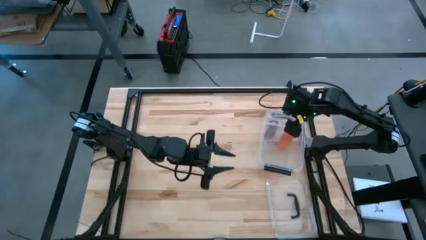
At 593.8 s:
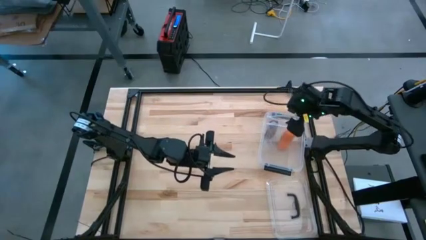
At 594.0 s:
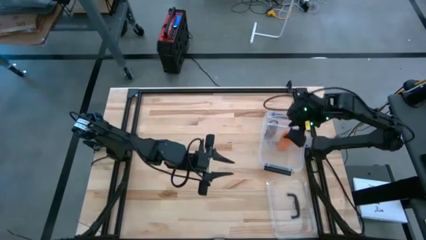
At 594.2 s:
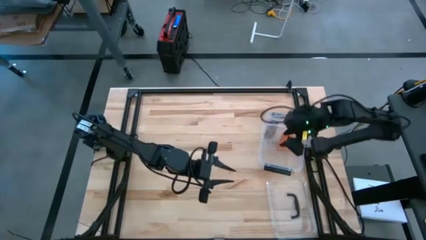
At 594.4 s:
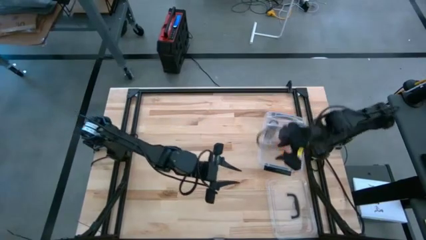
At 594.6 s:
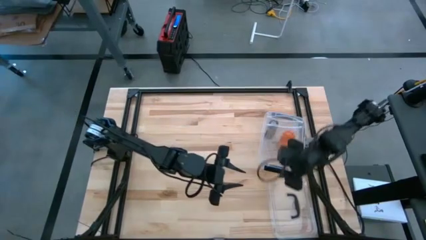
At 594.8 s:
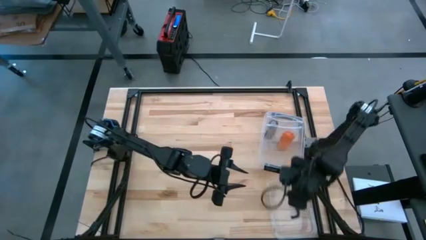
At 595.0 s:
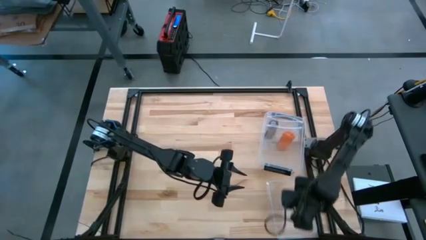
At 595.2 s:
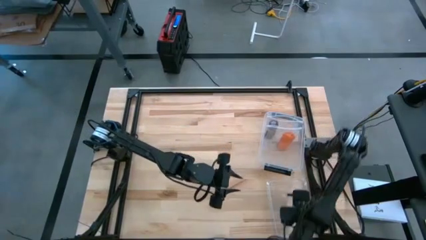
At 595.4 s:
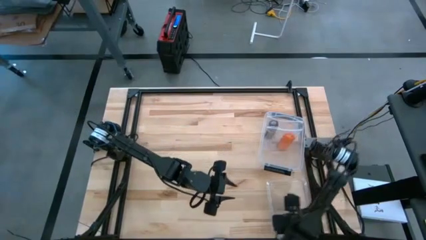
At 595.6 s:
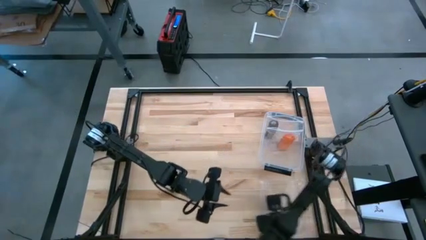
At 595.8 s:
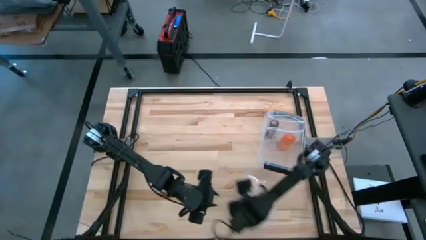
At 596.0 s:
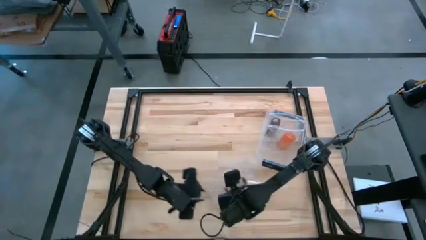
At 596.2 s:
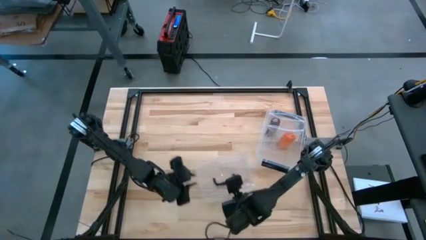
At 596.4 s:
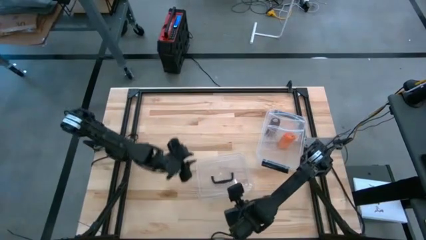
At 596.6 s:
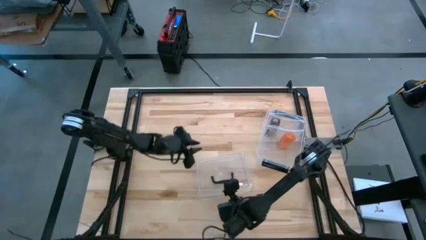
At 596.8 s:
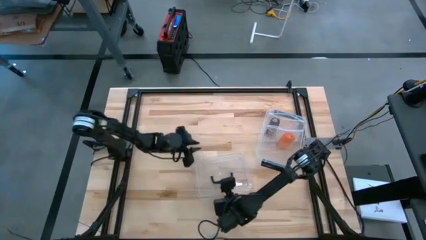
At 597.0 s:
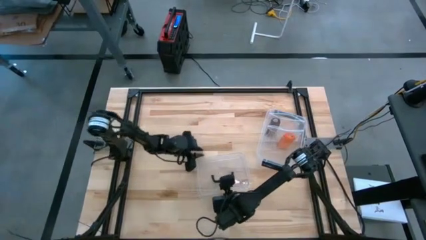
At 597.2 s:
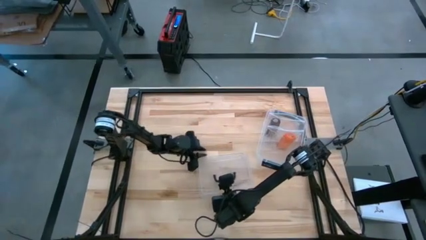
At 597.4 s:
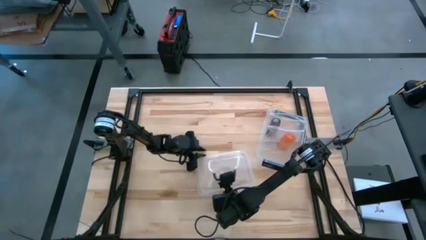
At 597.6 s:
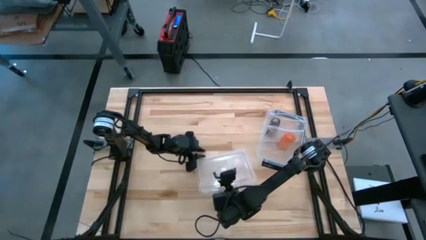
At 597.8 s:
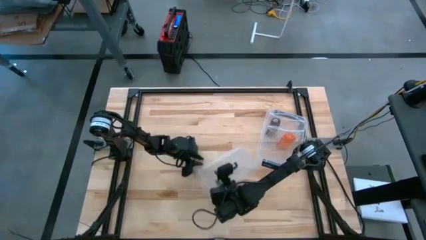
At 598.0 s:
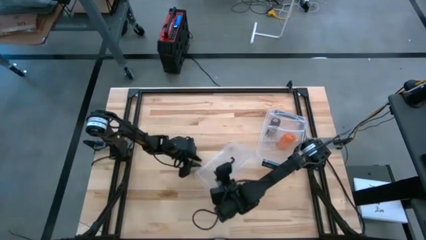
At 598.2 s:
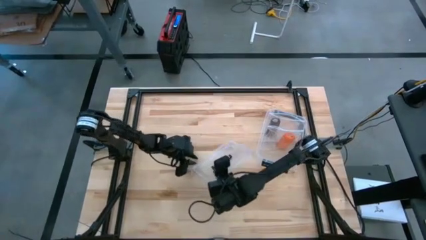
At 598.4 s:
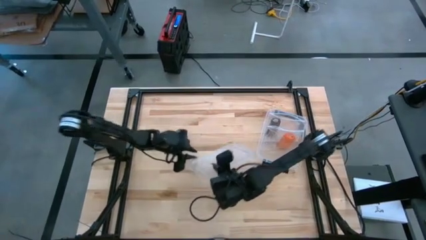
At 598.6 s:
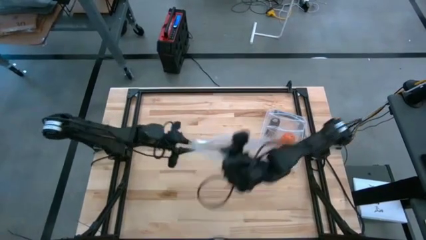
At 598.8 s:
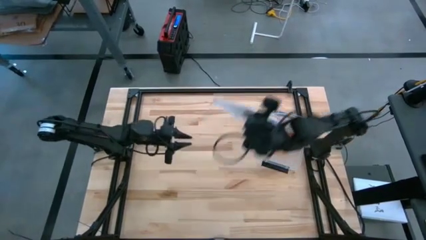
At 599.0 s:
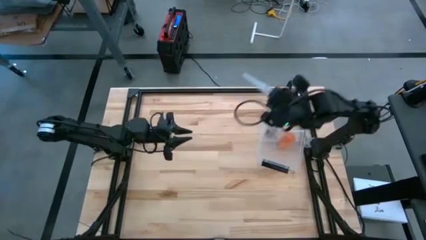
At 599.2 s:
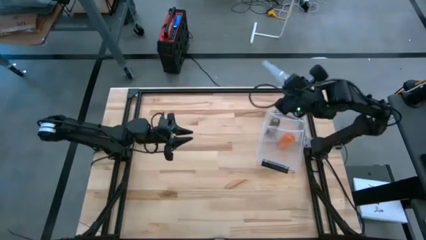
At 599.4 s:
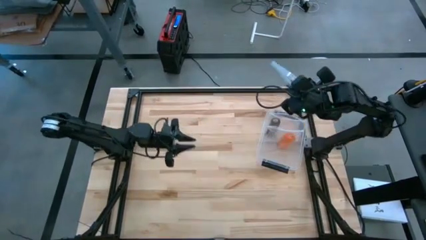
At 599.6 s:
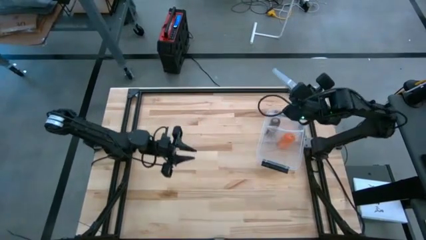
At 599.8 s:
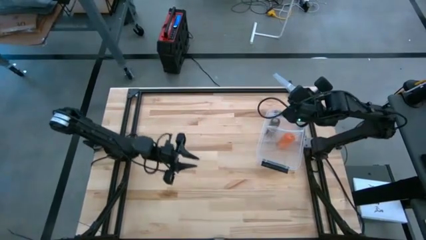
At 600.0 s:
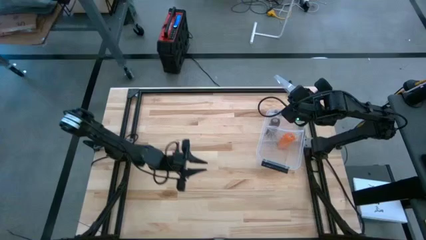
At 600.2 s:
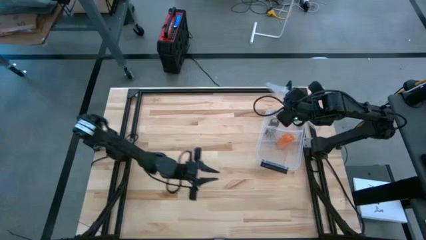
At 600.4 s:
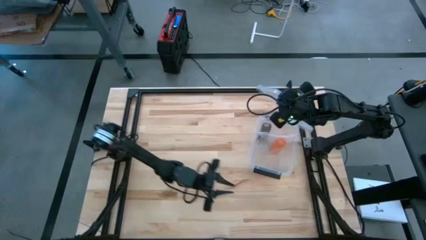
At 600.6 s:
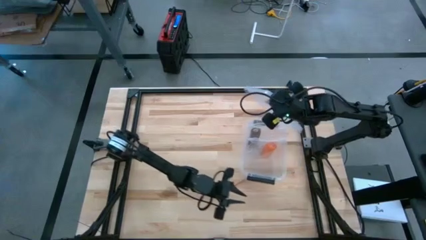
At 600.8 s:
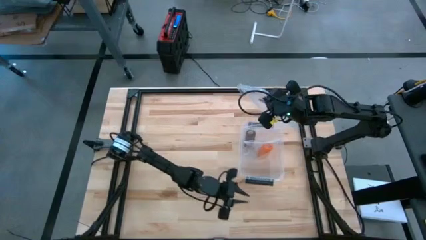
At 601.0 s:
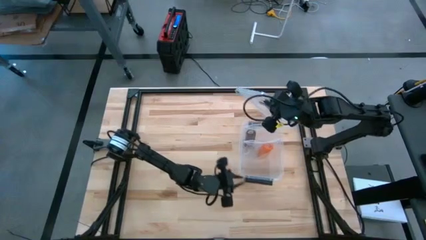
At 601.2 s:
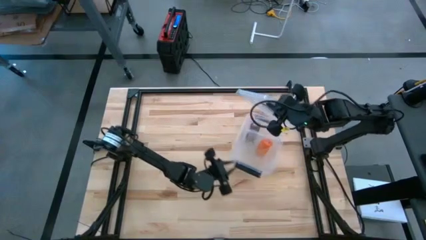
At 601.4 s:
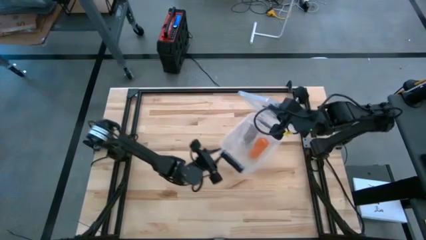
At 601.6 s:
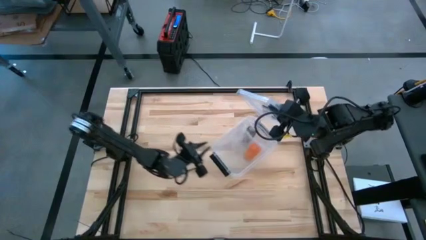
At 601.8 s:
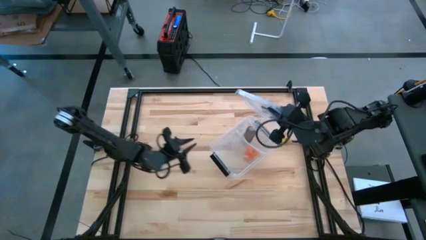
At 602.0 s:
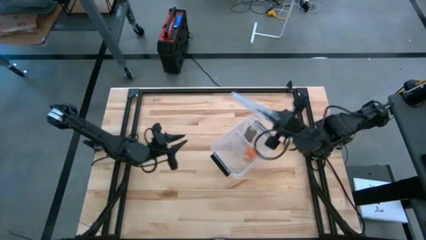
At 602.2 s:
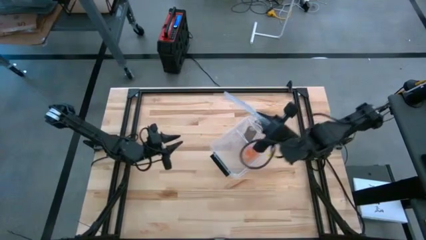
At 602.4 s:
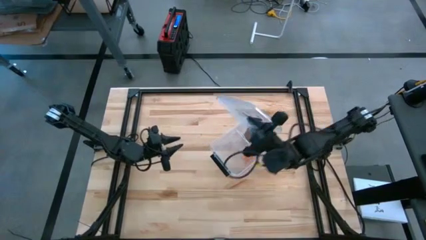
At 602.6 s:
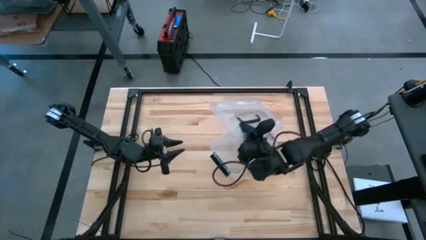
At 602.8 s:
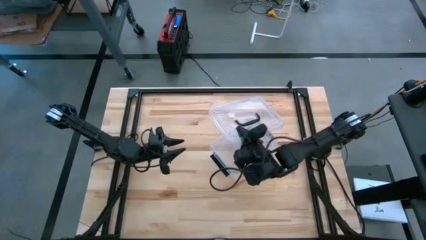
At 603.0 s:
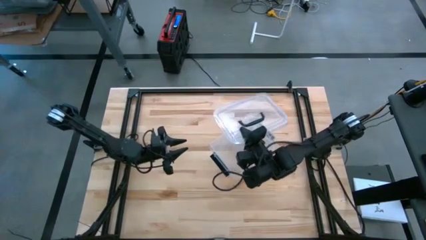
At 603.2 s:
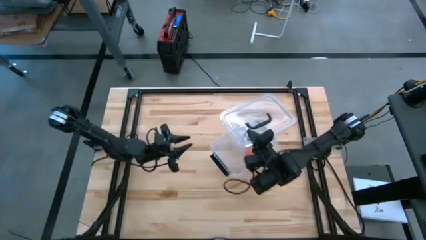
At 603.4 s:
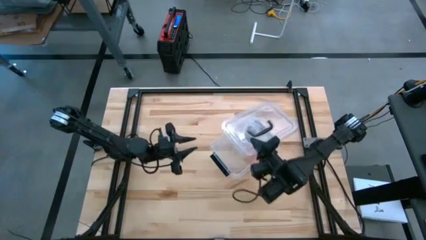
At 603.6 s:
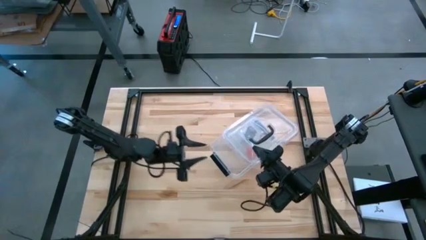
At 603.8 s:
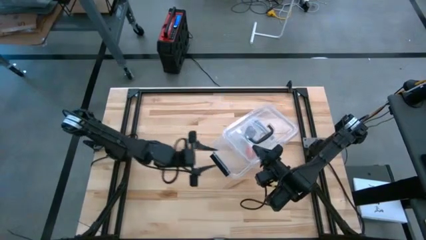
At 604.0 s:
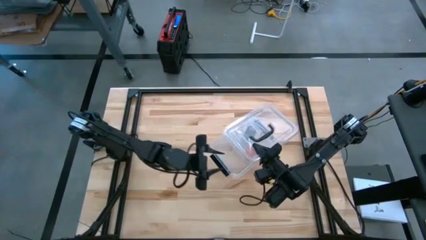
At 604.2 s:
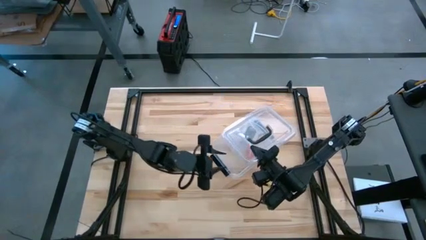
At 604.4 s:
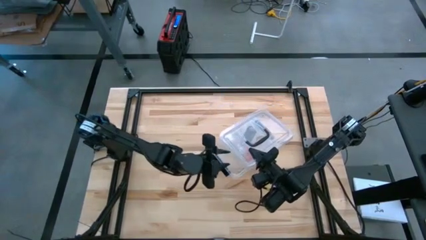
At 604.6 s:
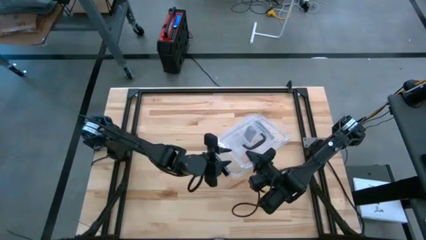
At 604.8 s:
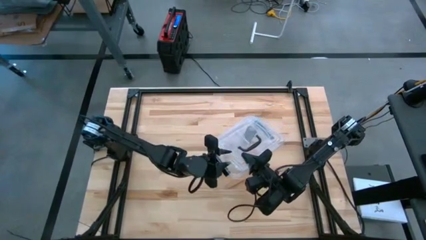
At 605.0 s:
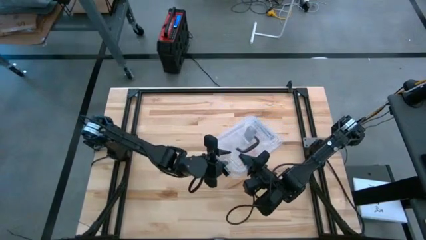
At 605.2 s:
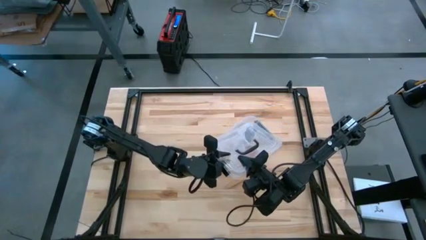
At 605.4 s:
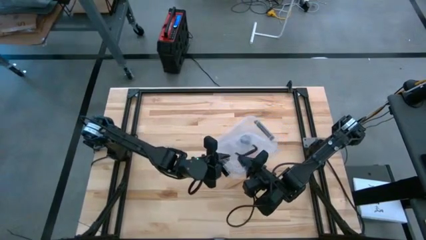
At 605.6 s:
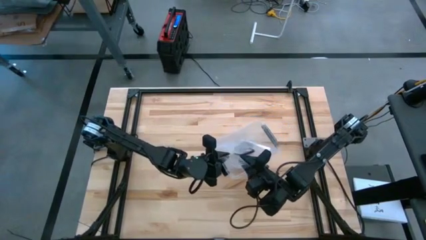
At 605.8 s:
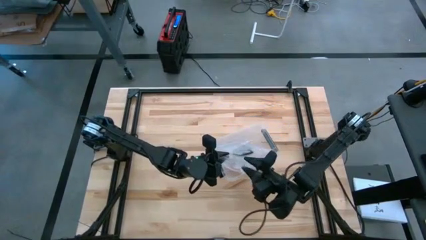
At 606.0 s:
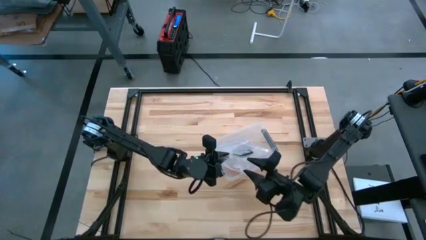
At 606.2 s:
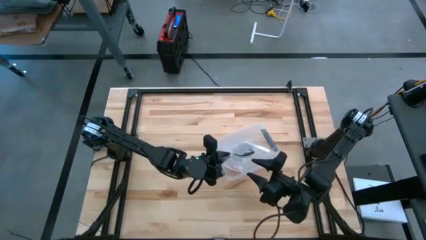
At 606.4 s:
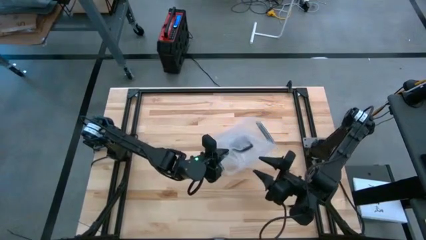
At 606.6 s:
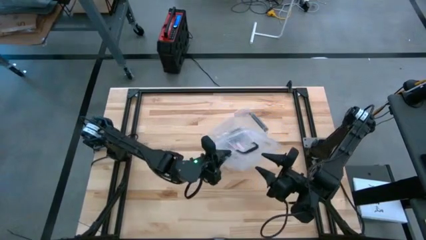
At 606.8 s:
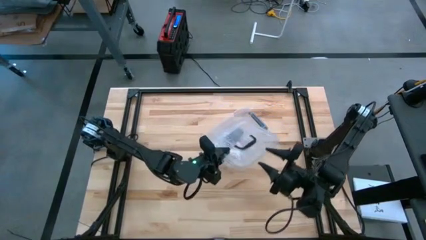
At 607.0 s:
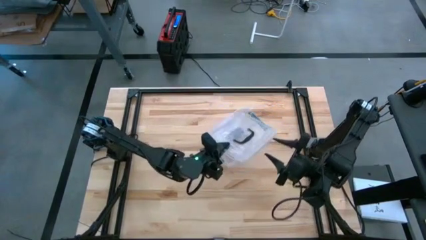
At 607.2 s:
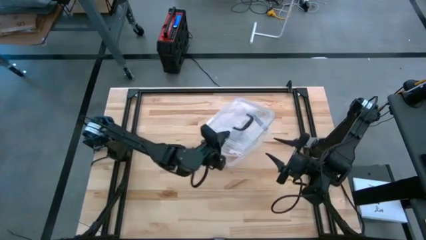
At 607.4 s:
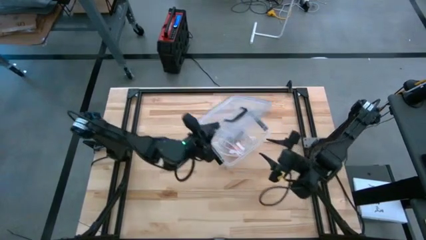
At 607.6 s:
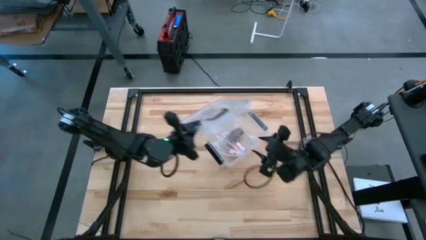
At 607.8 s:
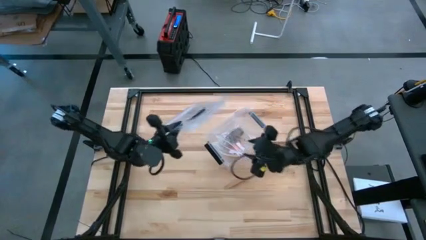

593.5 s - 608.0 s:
Task: Roll bandage
Close the transparent bin
